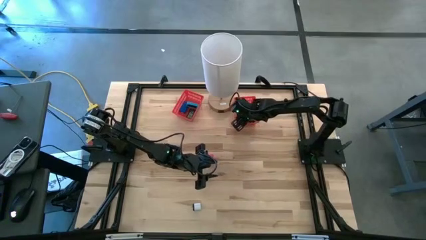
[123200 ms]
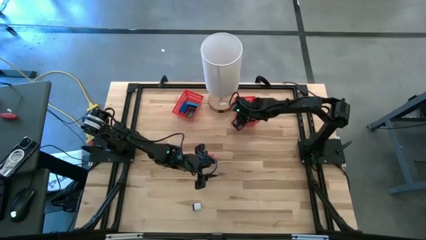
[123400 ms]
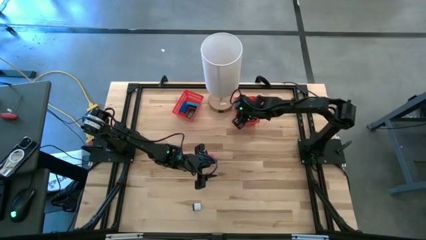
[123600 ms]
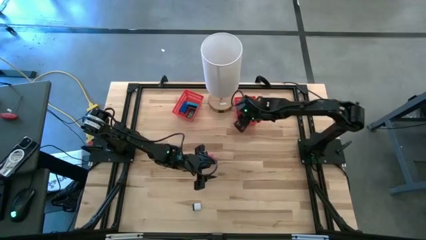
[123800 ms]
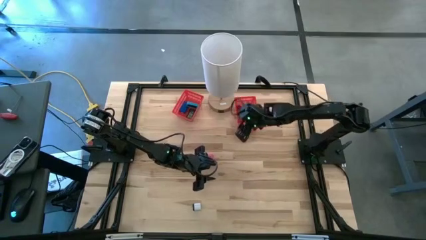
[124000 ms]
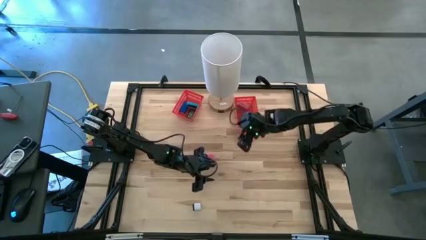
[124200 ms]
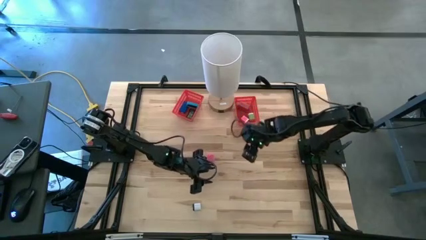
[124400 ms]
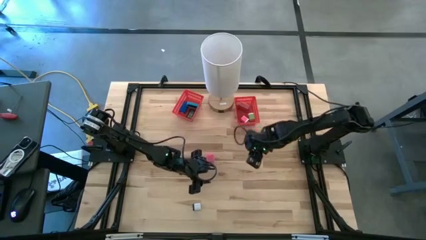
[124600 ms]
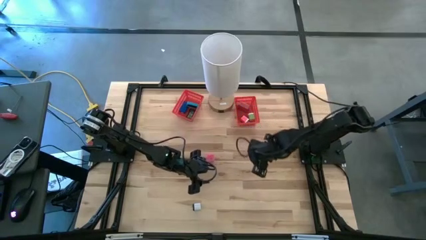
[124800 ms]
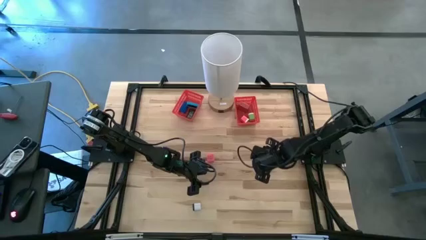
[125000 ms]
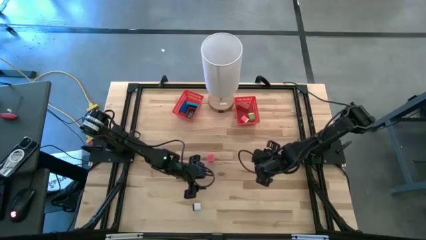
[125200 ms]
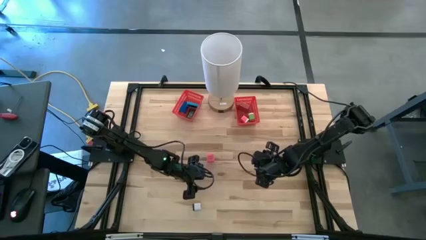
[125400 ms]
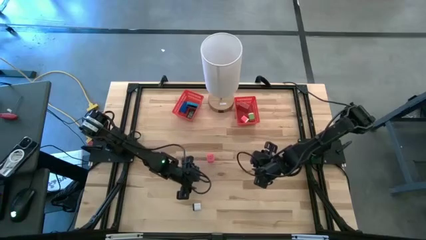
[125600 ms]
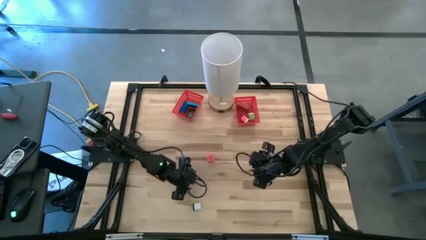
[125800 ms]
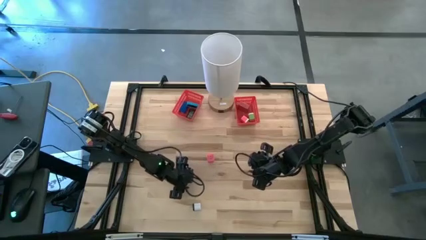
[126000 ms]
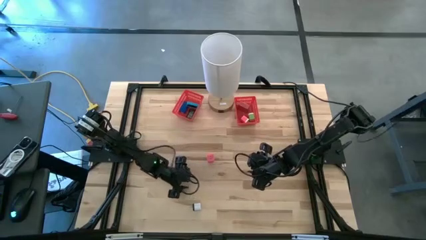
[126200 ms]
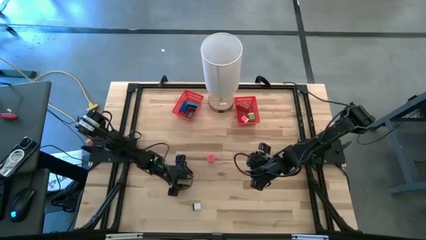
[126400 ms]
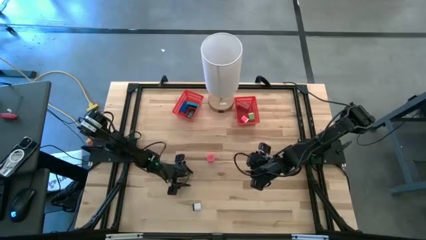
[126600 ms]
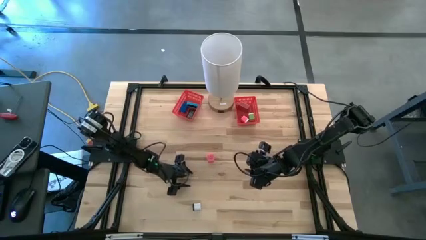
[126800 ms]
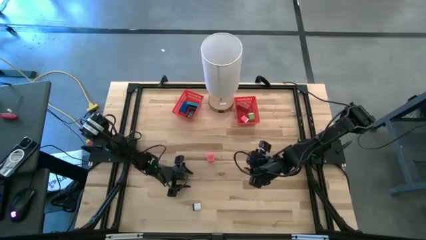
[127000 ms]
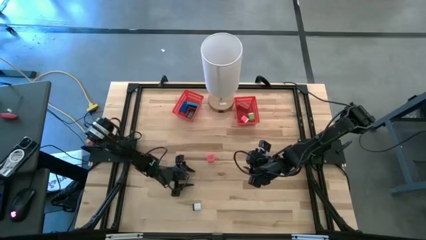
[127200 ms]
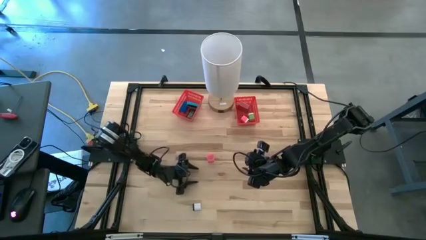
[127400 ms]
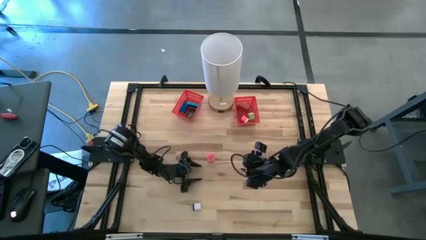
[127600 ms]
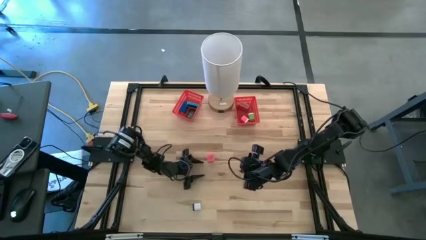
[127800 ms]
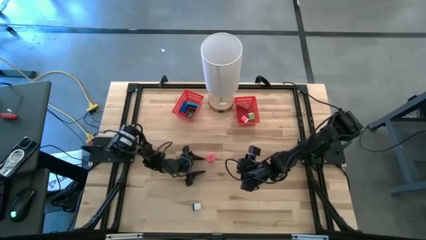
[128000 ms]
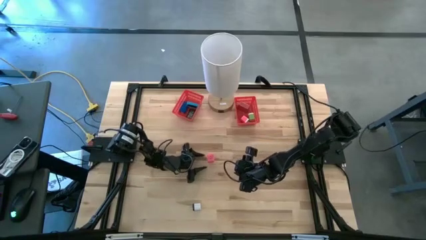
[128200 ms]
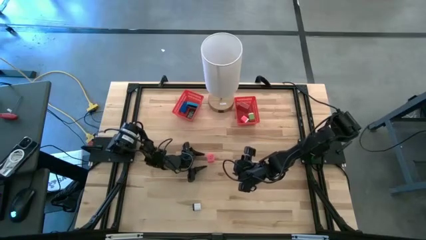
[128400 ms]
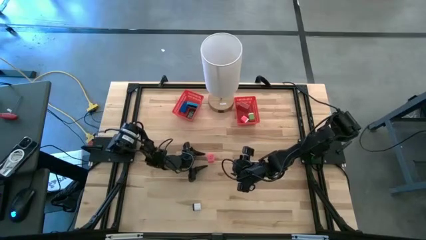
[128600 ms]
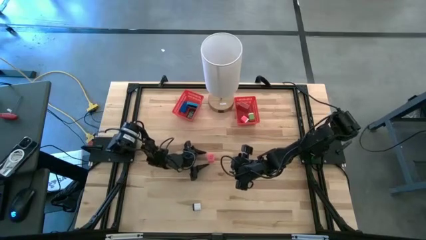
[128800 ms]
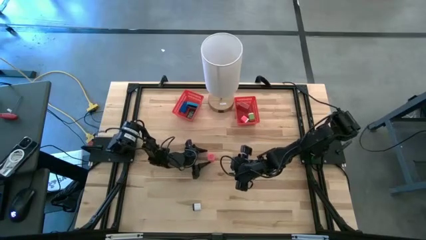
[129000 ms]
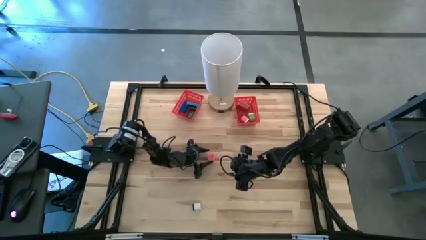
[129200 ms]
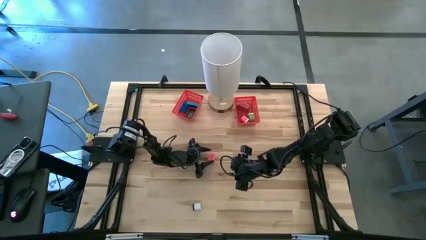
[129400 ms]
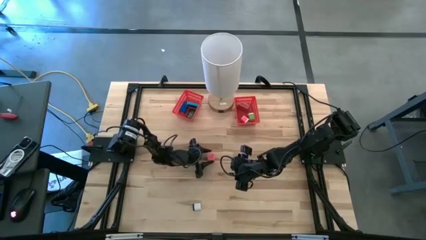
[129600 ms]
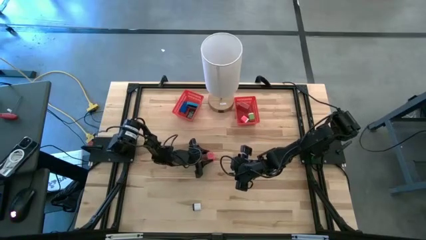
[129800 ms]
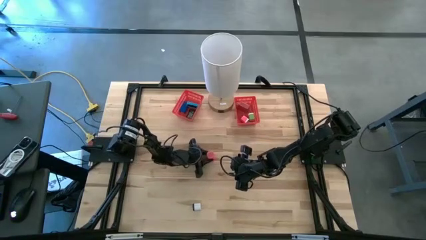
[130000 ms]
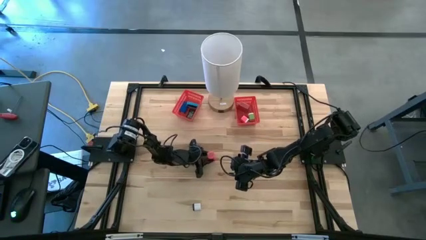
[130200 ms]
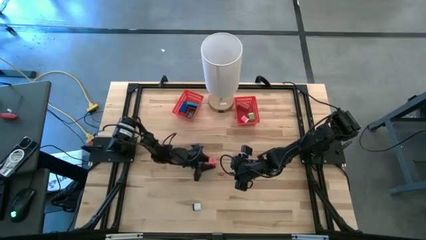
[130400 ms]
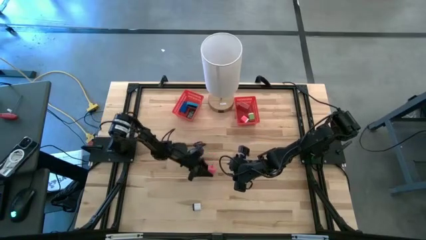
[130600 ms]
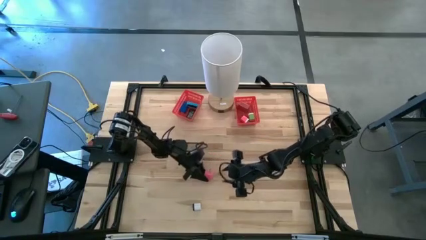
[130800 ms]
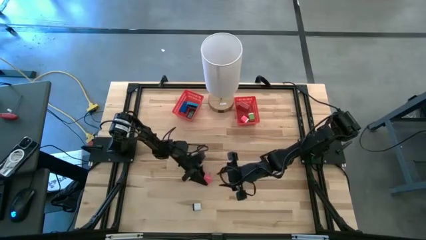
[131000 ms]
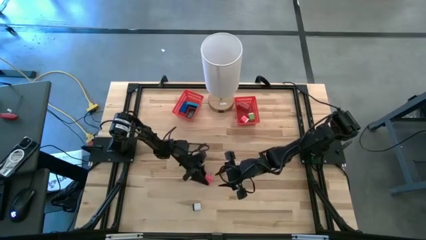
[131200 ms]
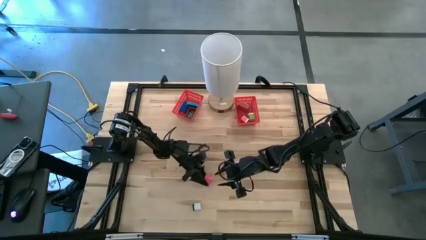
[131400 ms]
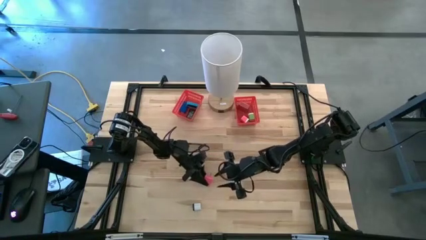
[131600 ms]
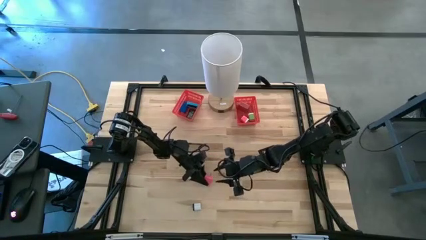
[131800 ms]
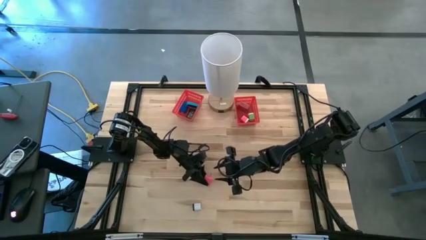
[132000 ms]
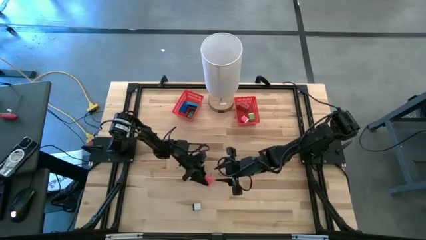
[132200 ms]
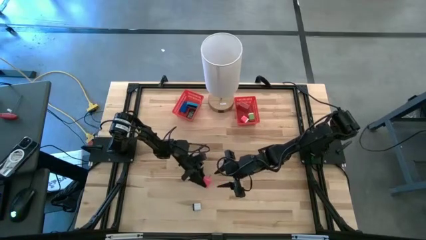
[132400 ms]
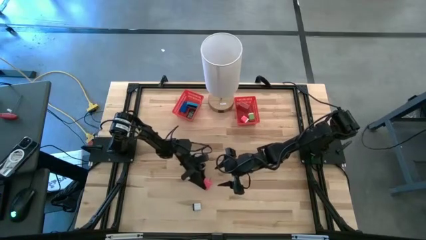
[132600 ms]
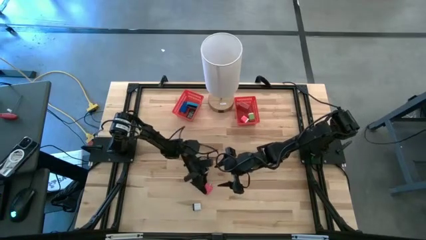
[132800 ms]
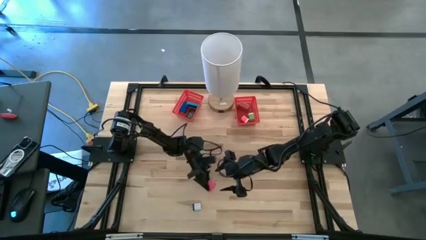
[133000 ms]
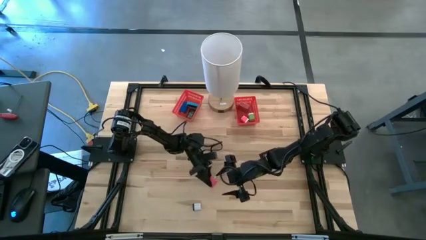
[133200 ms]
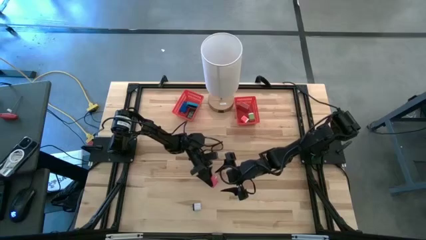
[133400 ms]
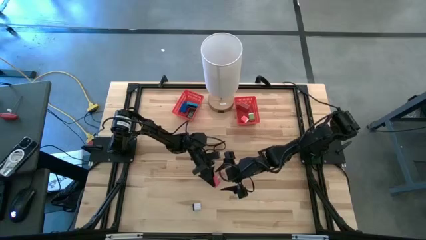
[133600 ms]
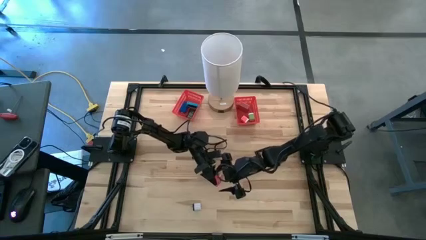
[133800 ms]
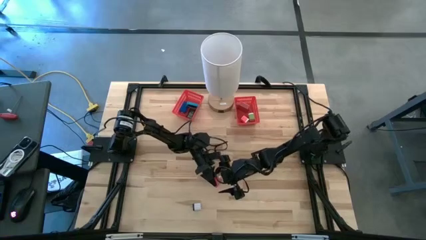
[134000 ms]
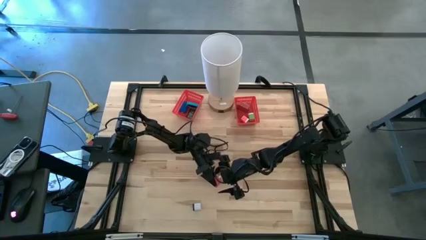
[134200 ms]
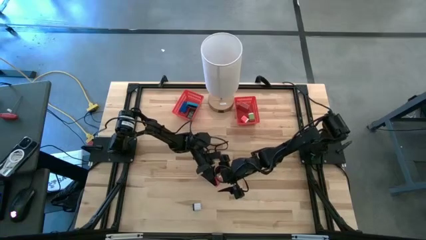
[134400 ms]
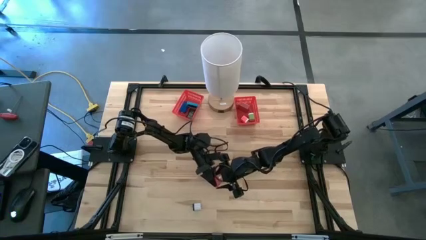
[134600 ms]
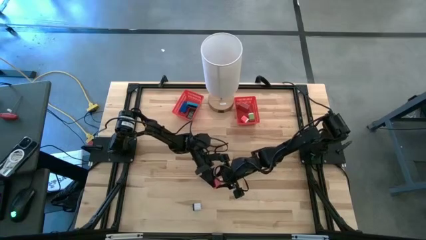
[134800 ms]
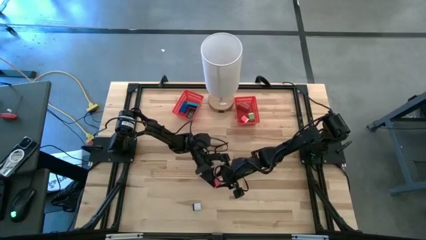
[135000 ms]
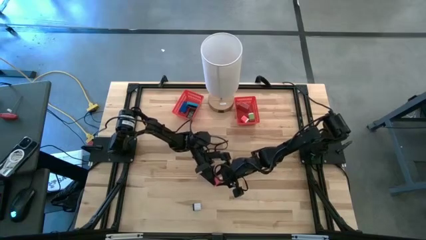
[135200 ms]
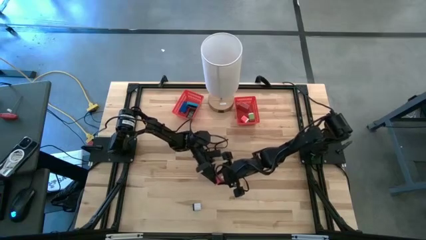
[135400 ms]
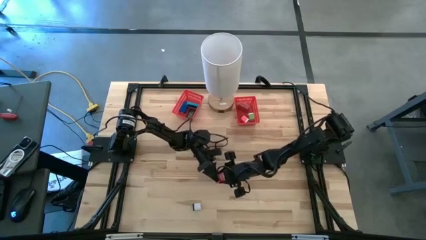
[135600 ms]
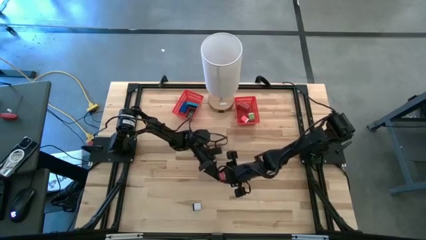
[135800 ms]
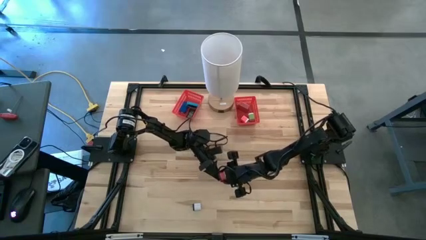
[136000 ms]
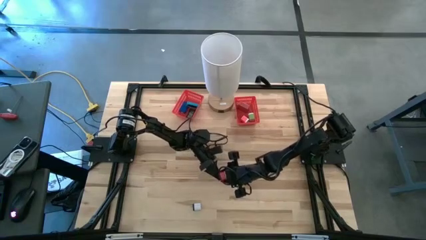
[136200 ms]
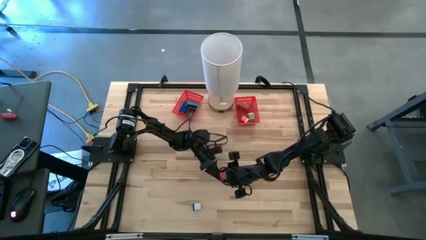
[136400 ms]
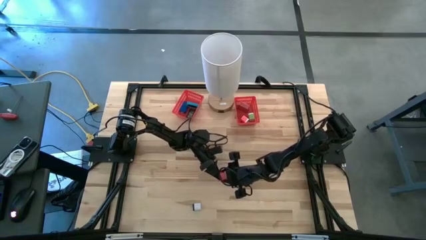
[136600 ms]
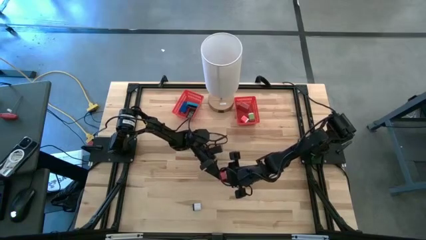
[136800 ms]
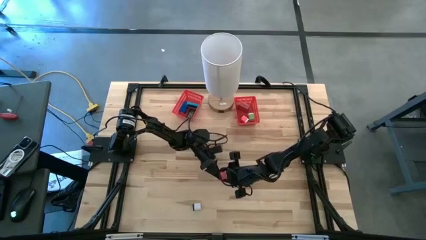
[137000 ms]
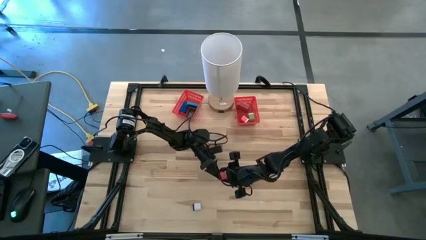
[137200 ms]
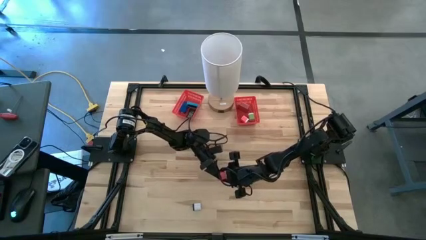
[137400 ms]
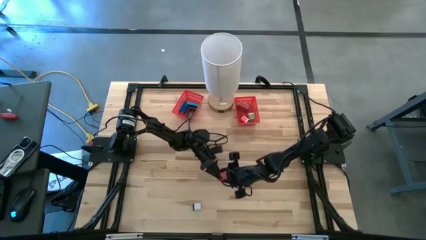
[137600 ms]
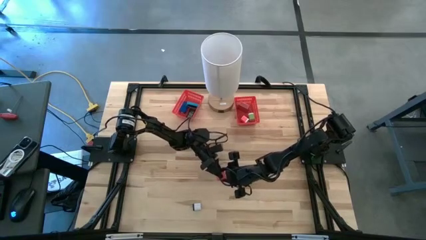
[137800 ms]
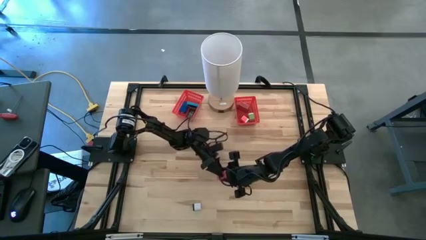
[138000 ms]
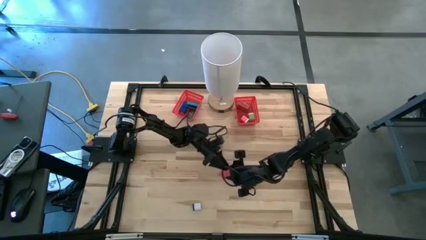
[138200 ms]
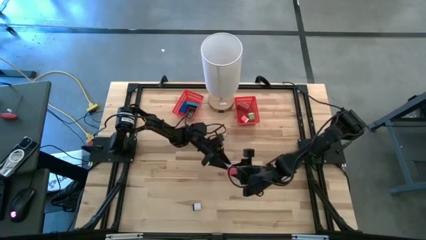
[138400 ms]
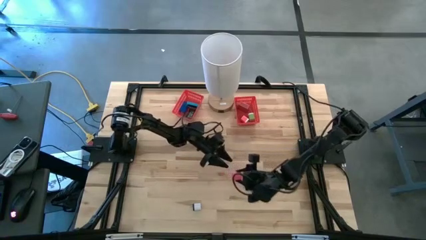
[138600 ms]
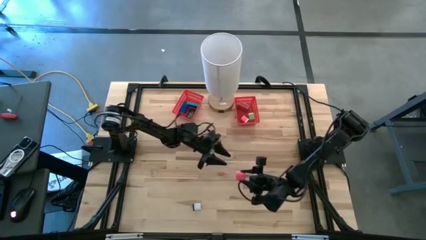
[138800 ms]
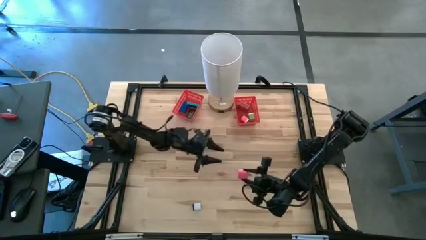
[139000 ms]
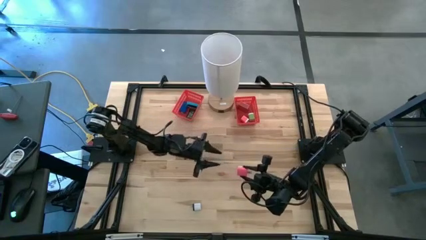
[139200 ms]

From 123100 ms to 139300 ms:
Task: Sort adapters and digital timers
Put the pink charger adapter into the right red bin
